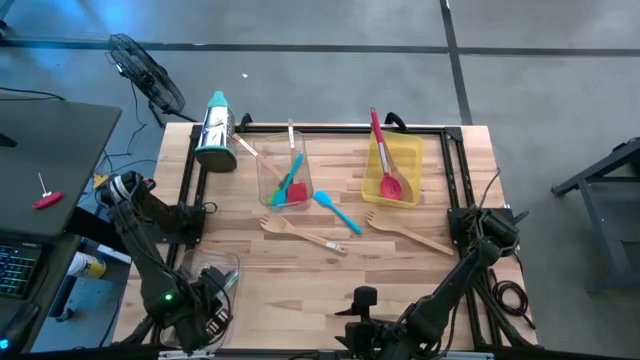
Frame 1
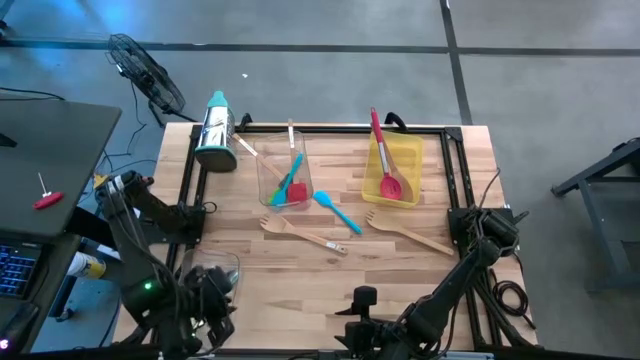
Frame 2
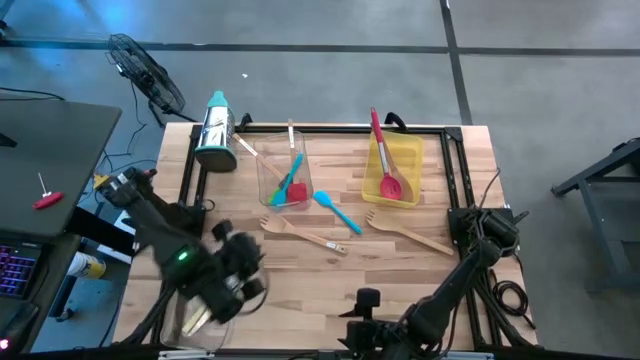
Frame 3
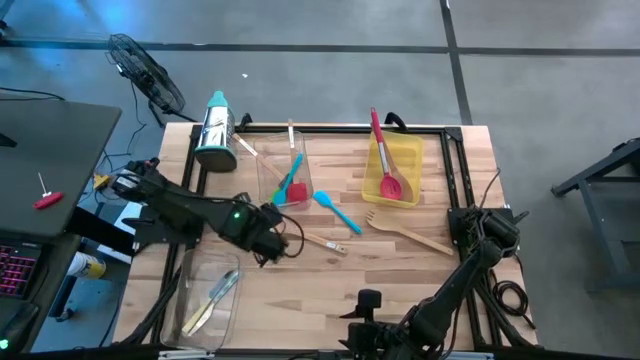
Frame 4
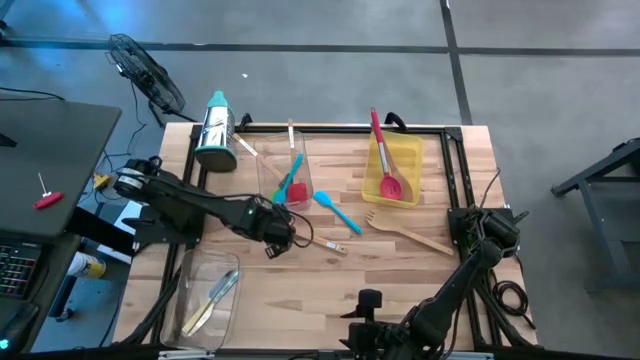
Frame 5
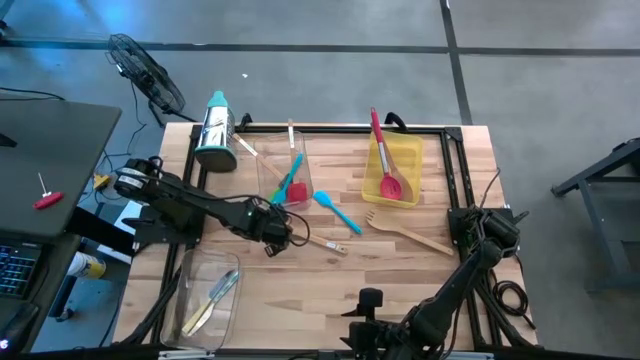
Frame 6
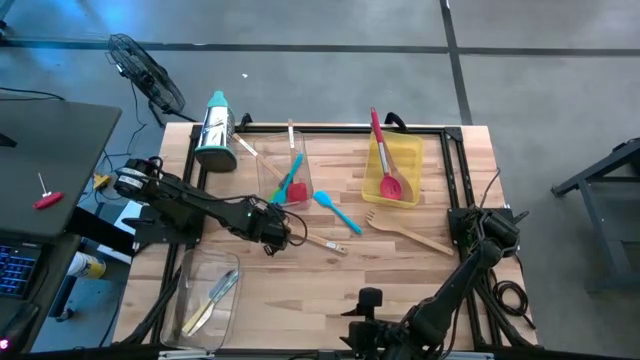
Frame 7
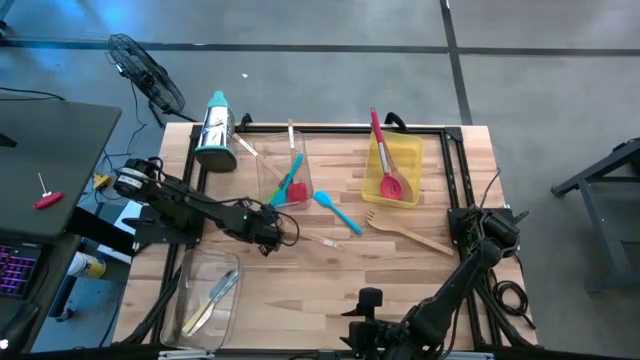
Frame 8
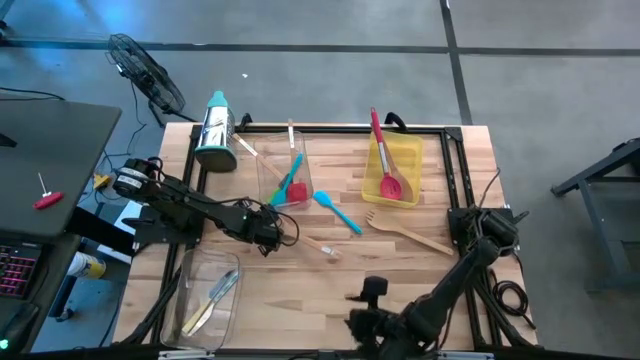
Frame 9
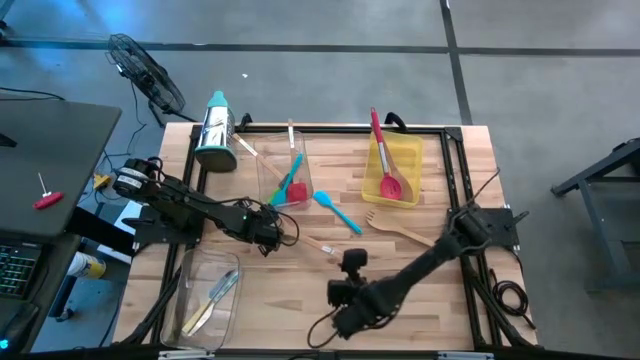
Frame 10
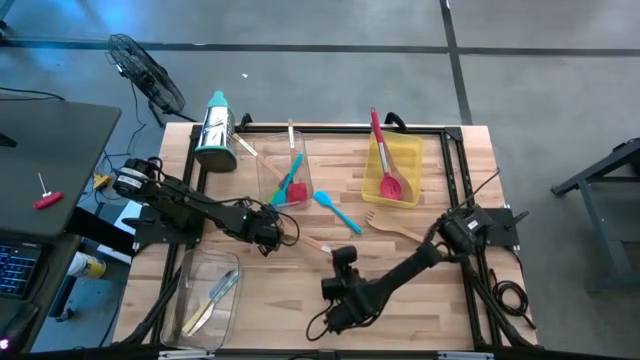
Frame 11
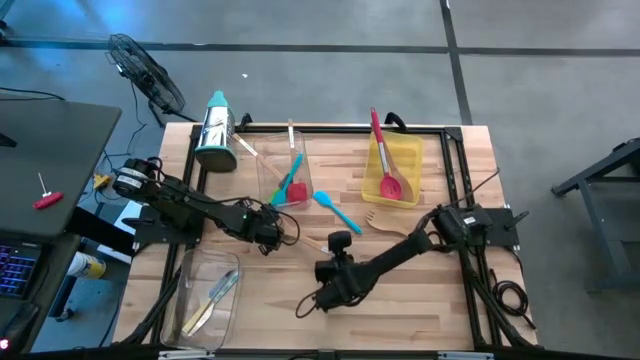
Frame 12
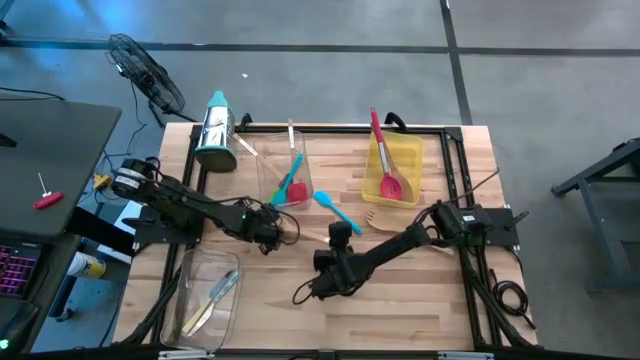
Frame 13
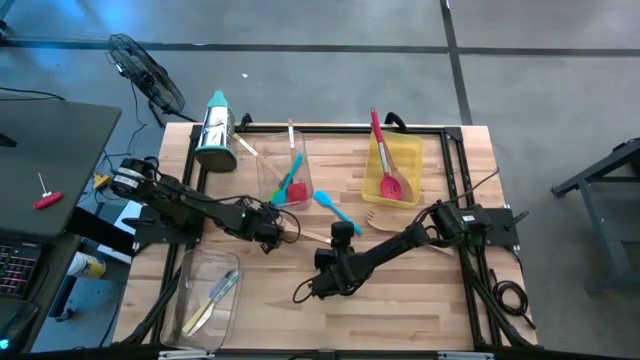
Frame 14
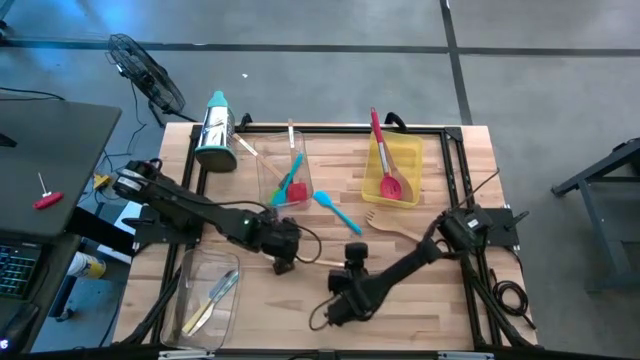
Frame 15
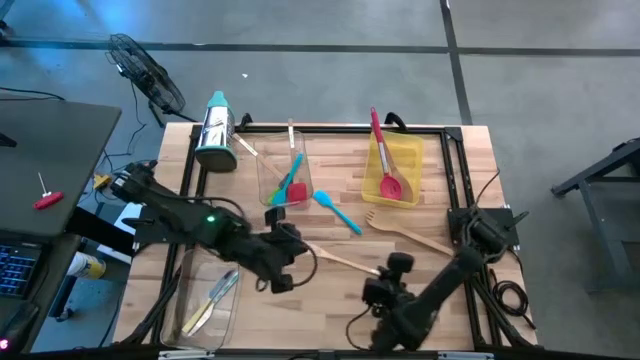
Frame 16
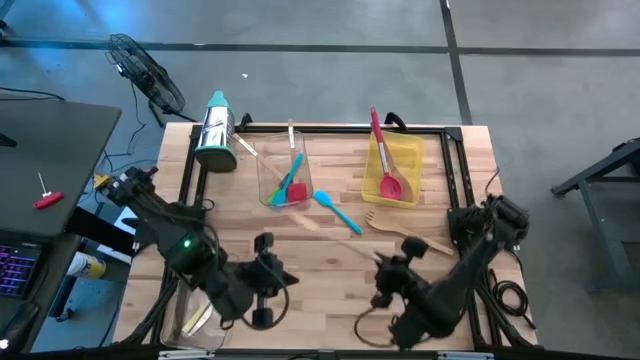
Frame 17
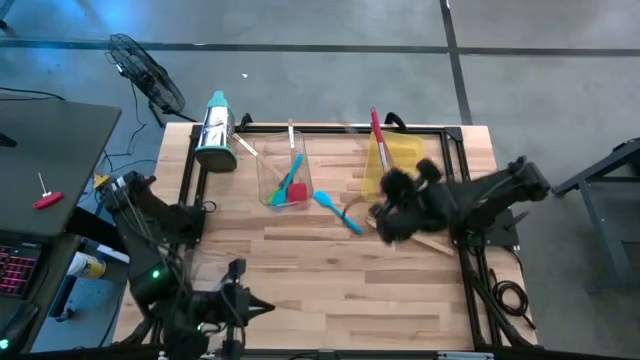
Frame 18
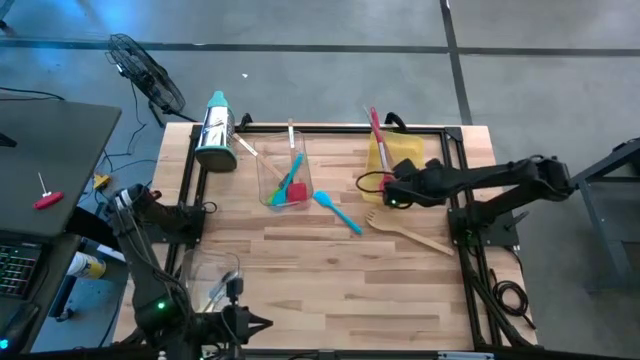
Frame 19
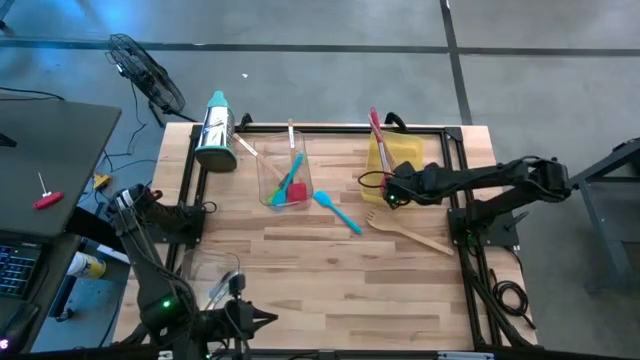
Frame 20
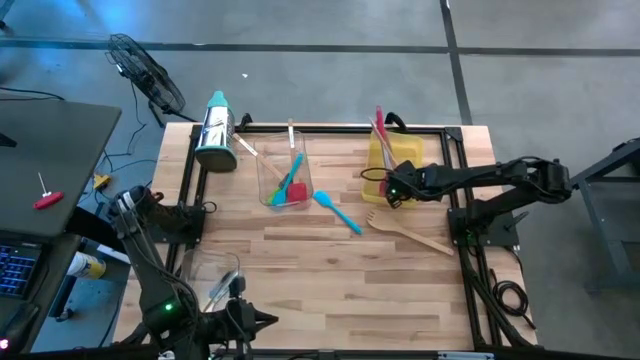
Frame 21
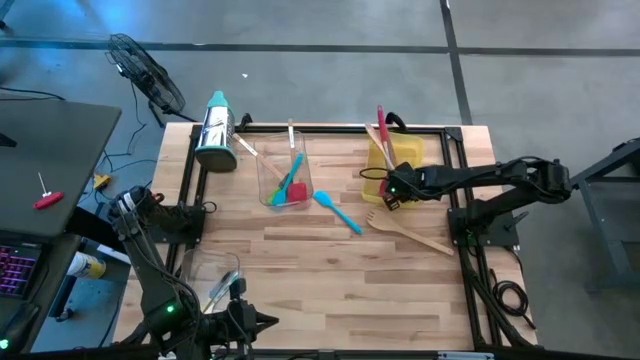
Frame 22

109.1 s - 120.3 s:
Task: Pick & Place Kitchen Items
Put the left light brown wooden serving spoon into the yellow bin
